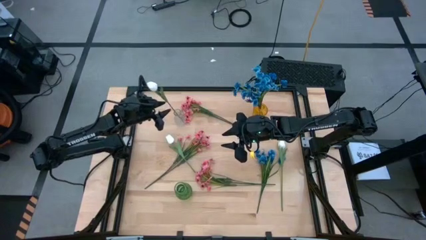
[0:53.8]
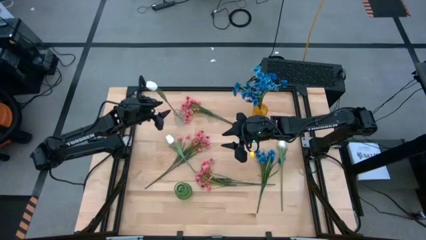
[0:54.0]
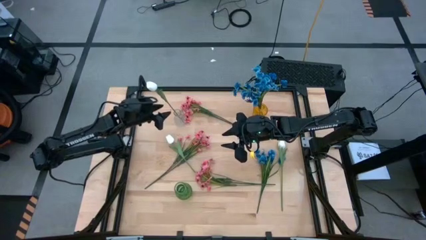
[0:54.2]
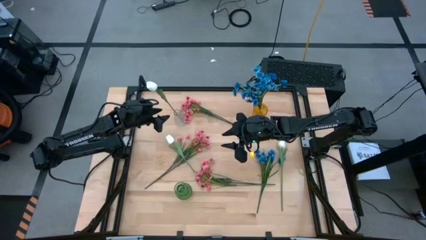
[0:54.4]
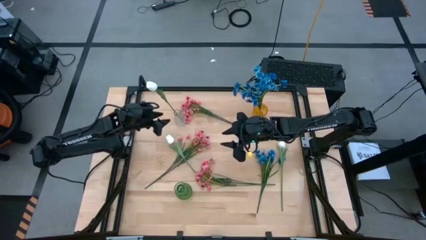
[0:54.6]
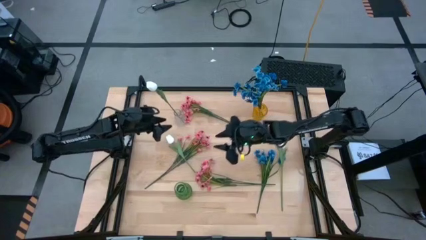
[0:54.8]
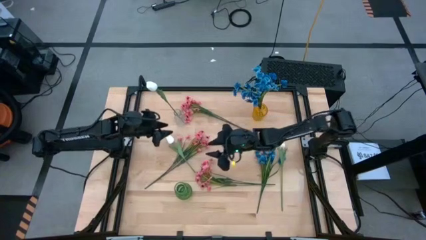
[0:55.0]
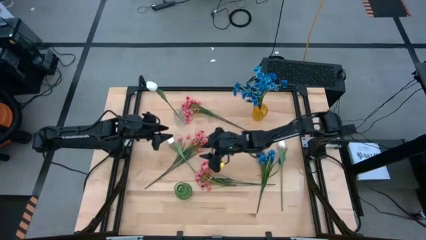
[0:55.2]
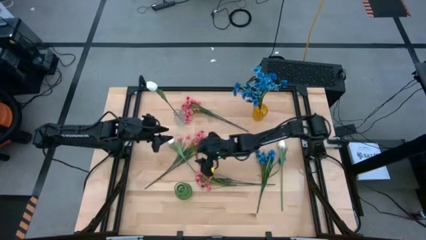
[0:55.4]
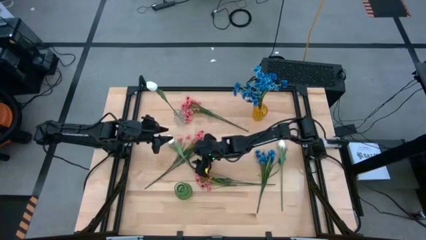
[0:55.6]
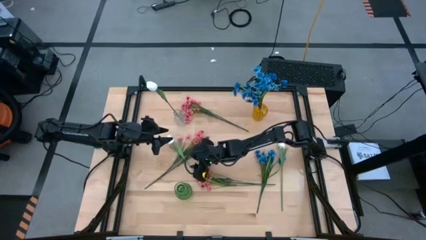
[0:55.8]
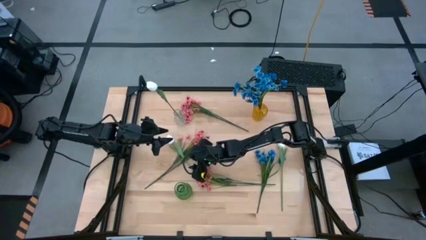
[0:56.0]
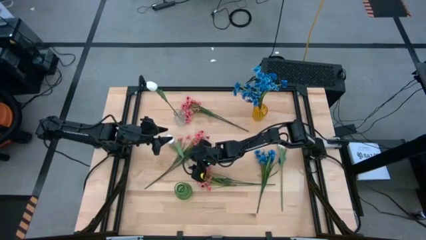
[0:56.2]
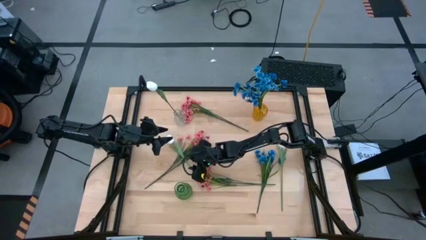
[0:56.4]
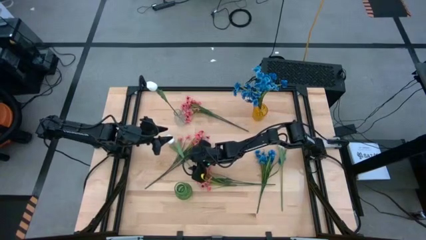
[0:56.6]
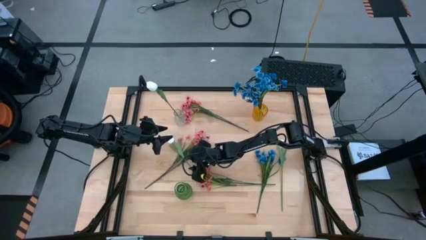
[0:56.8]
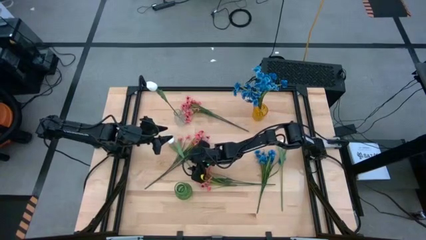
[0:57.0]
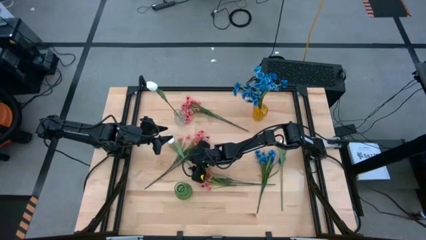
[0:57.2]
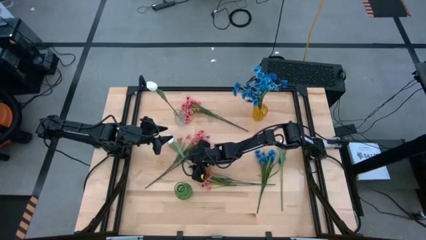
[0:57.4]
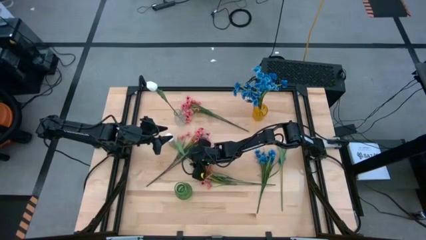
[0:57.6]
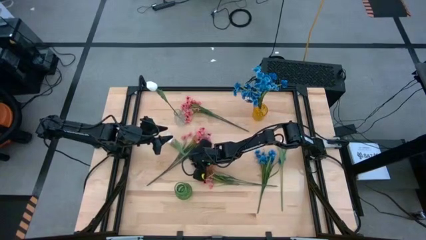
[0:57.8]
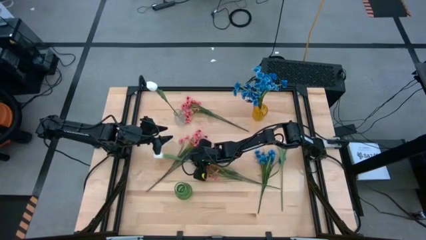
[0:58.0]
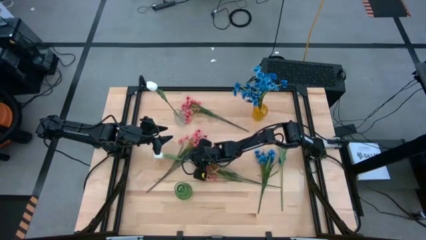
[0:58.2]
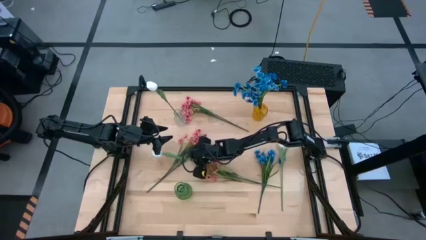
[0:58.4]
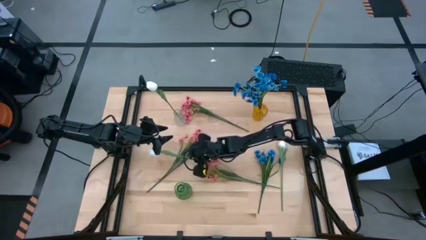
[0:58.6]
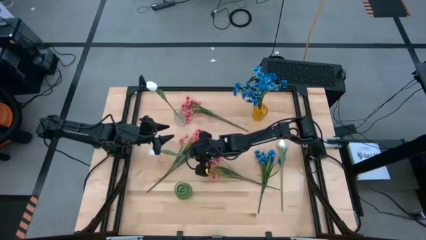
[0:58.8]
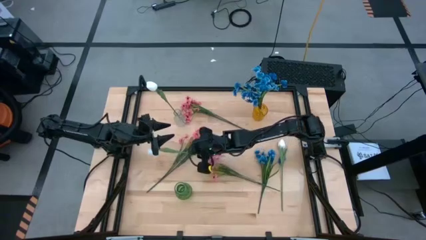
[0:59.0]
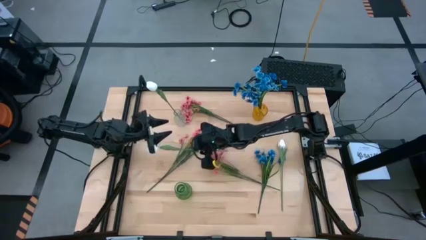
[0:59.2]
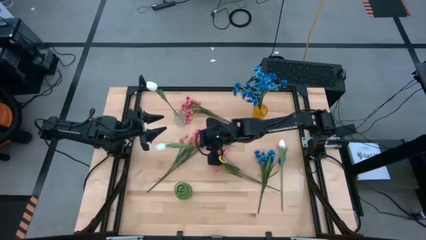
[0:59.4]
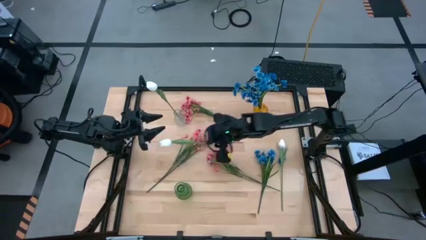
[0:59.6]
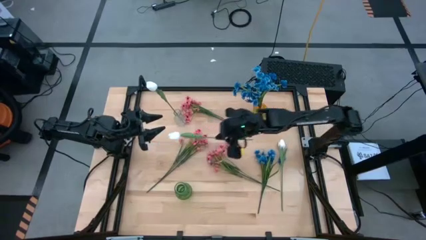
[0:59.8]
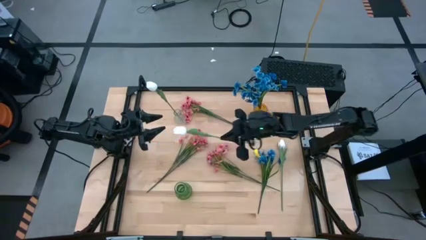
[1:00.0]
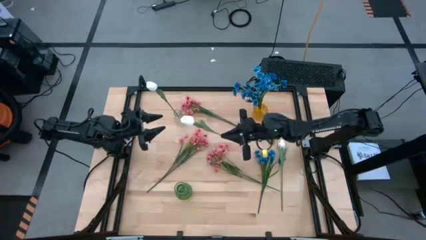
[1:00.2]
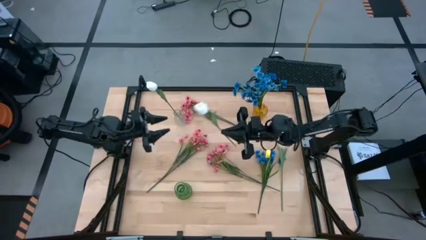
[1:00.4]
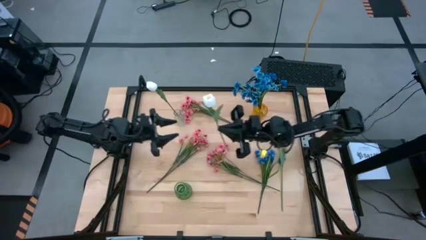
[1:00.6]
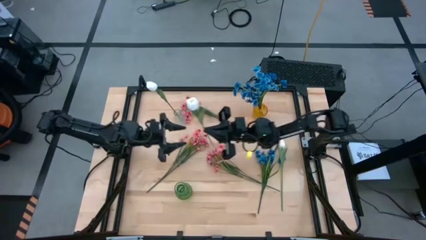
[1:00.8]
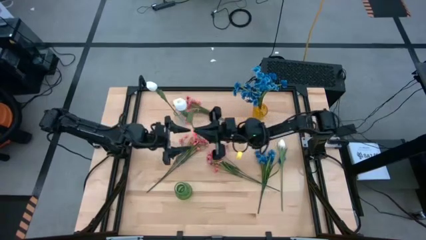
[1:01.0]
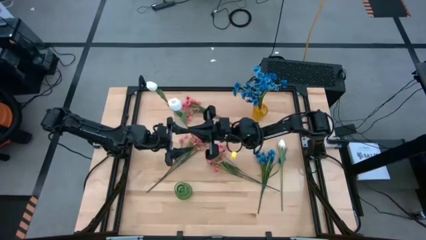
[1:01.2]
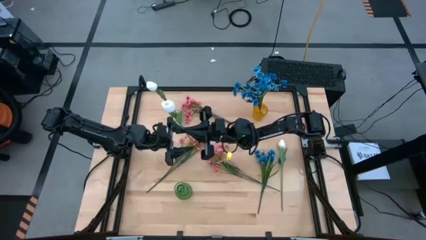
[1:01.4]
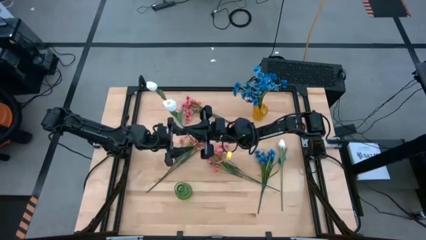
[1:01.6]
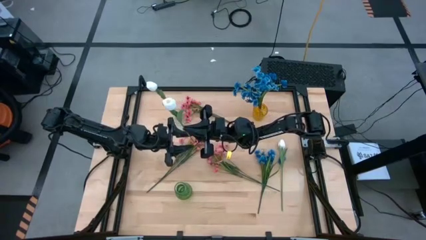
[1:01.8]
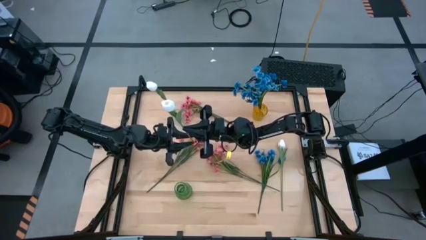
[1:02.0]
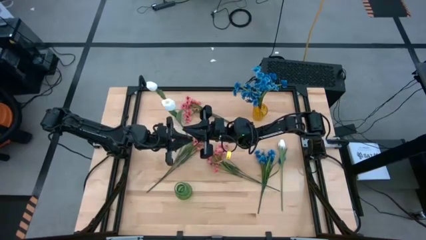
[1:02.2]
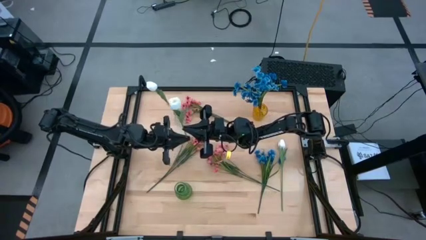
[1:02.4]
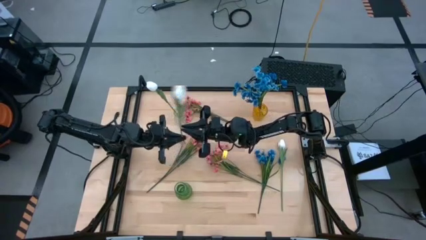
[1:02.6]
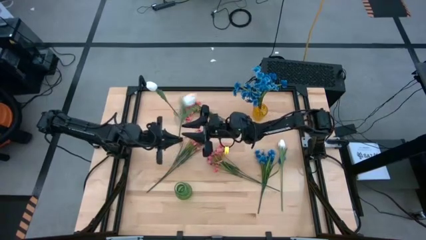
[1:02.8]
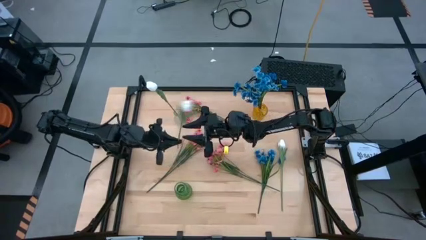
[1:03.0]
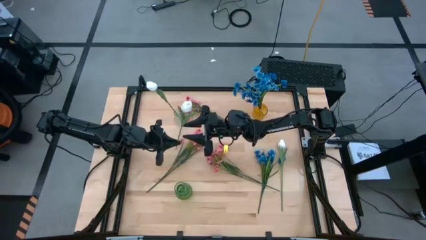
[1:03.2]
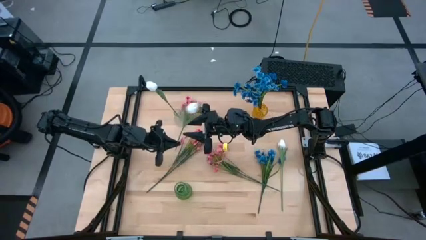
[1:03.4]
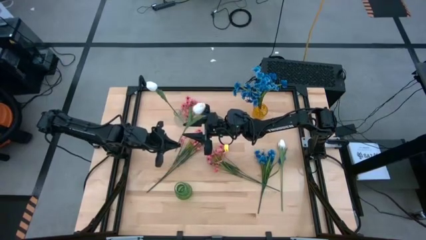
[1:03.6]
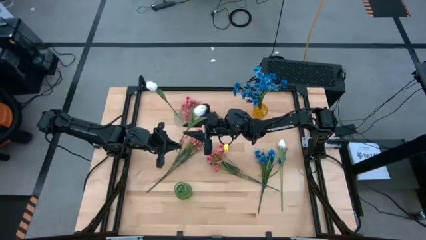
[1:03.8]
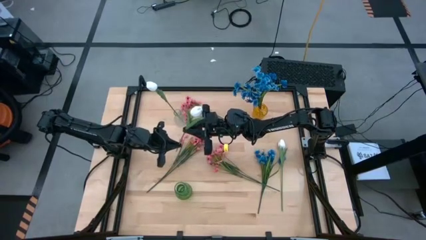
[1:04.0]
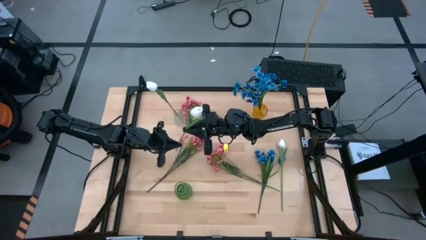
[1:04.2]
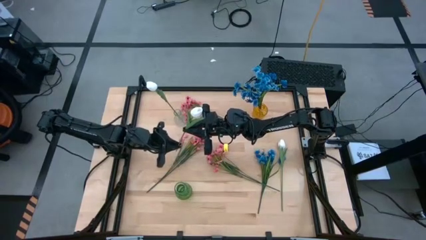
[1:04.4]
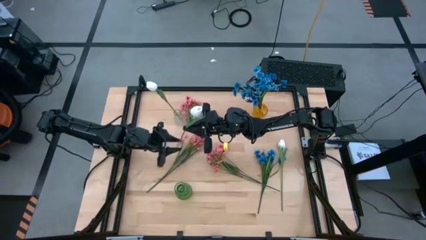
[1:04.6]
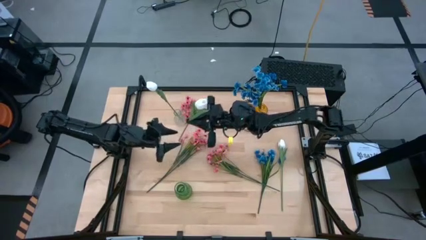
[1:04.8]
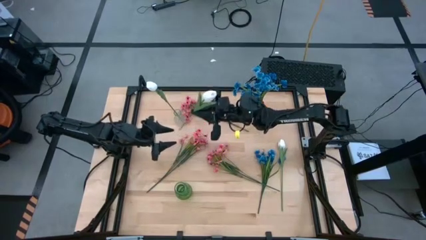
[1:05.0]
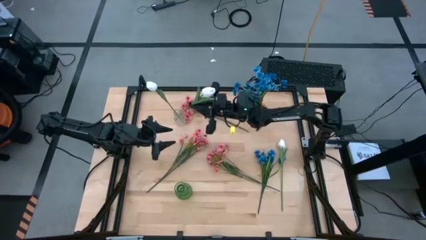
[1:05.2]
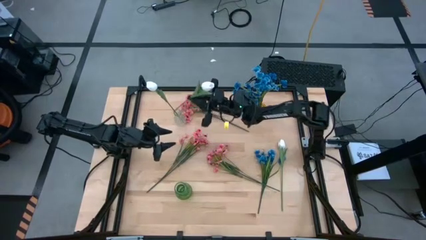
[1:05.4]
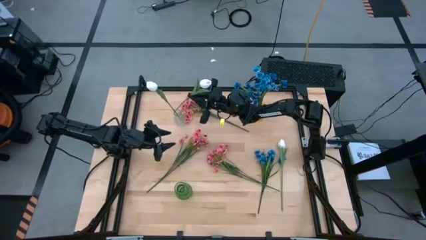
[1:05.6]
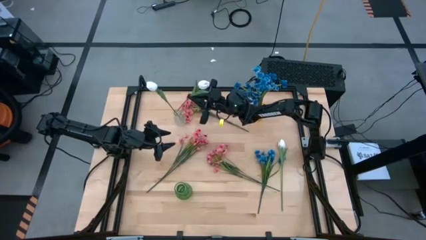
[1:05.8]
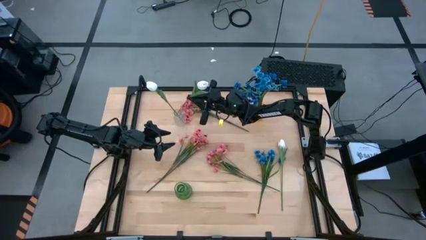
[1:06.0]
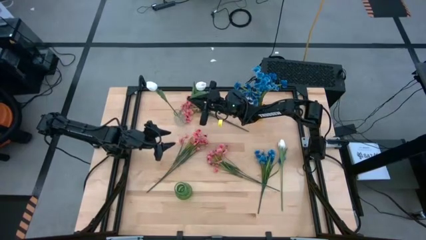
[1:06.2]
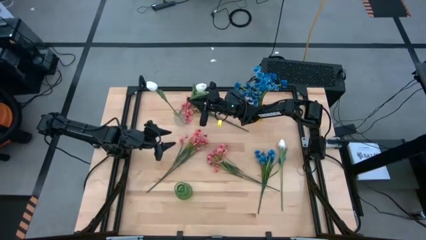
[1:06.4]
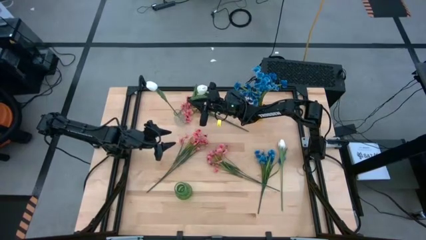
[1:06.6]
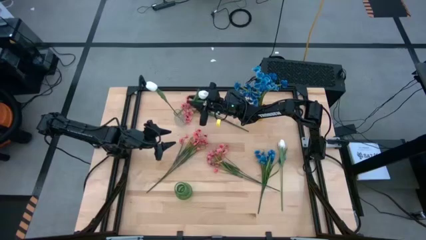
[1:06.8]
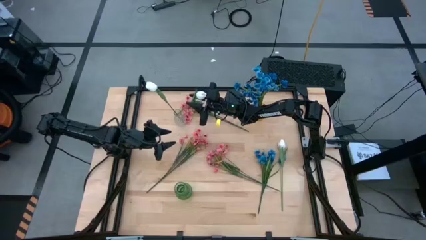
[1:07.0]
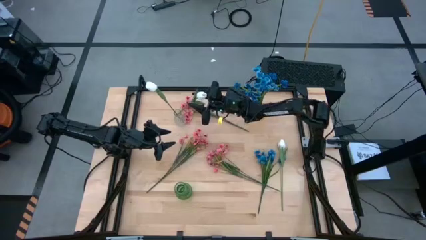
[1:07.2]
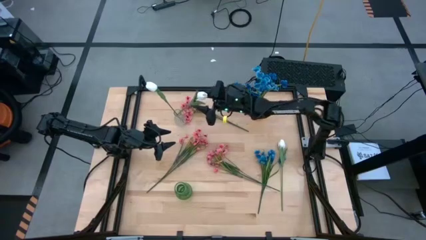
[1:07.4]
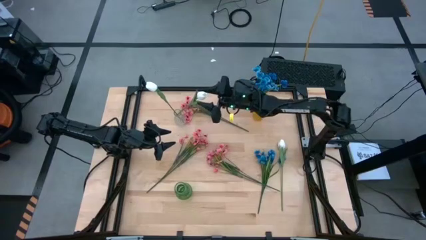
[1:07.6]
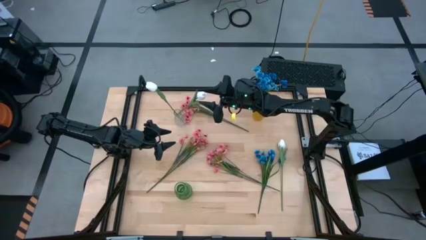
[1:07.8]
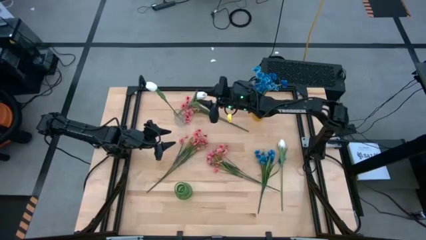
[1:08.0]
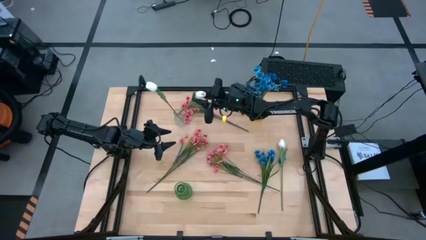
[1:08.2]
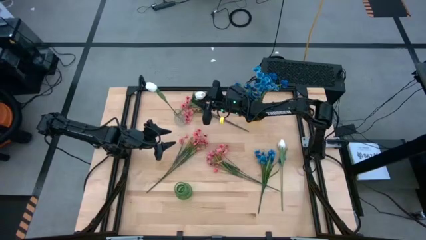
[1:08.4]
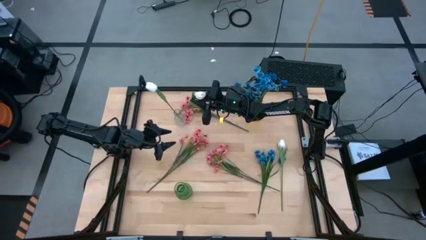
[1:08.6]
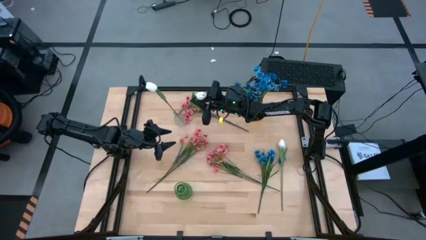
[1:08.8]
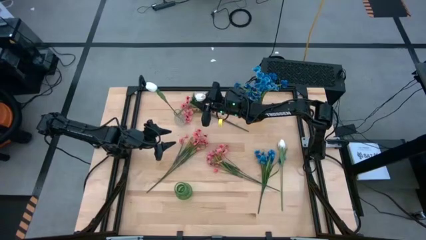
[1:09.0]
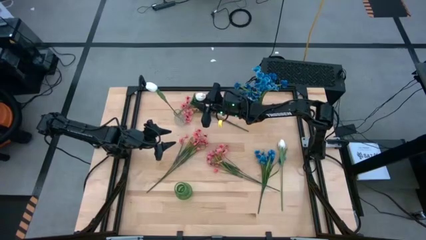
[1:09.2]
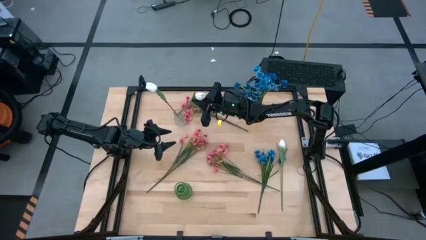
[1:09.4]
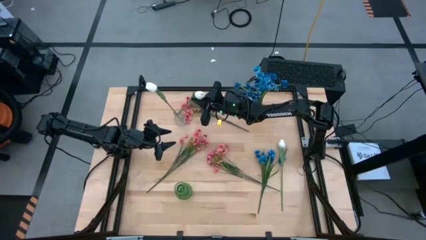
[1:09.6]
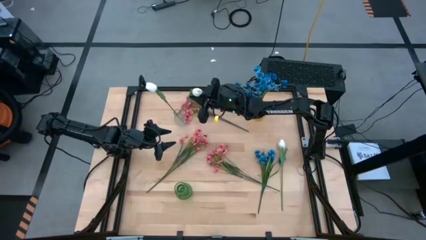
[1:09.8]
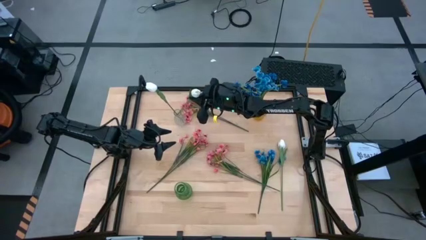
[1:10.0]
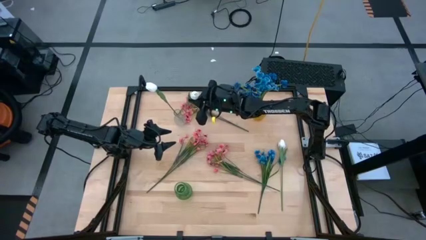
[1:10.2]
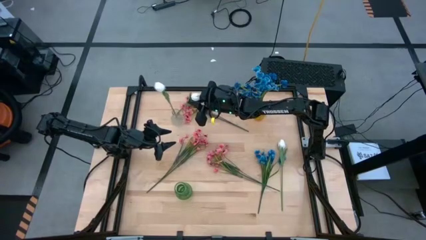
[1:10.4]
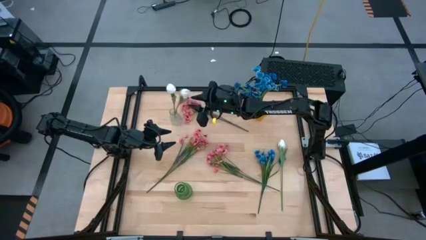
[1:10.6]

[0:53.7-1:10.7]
Task: Sort flowers into vase by color
Put the left white flower into the transparent vase
